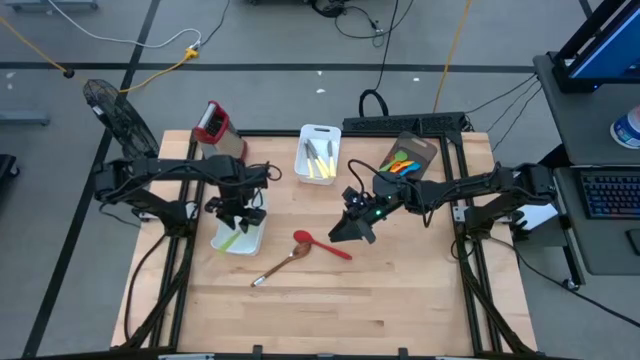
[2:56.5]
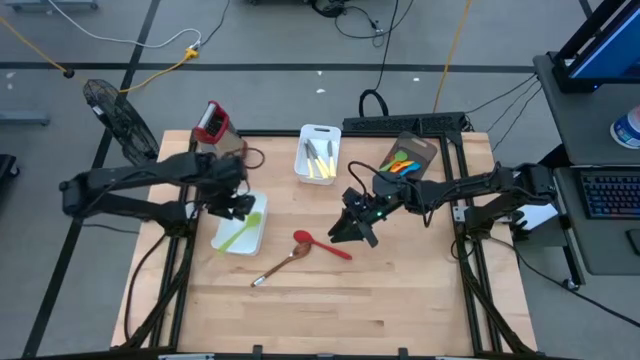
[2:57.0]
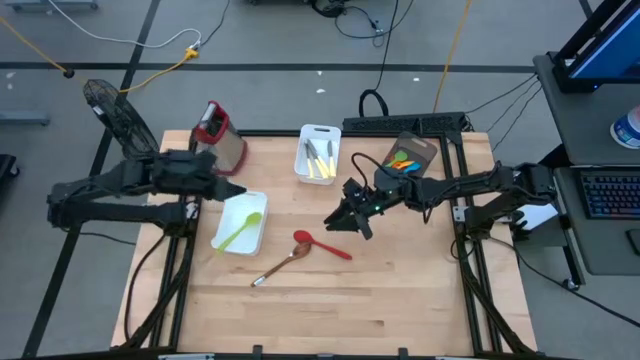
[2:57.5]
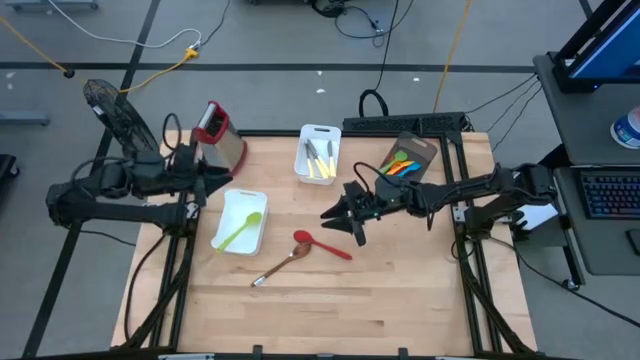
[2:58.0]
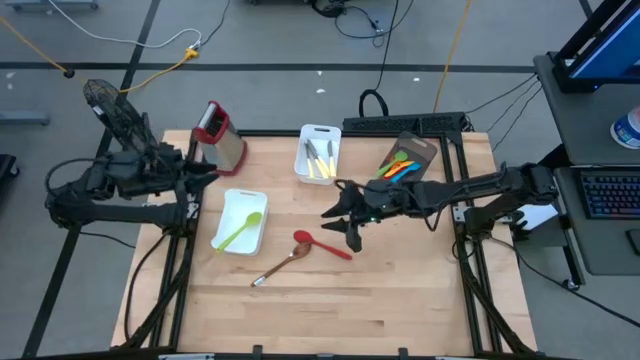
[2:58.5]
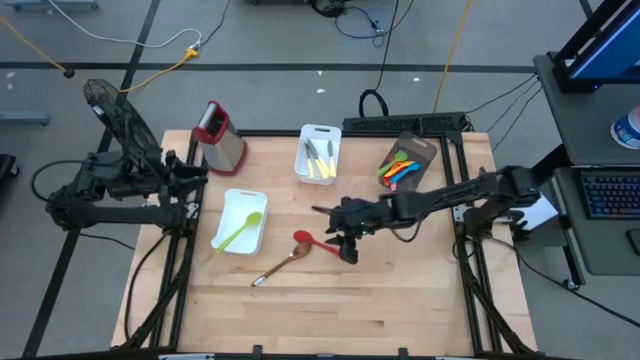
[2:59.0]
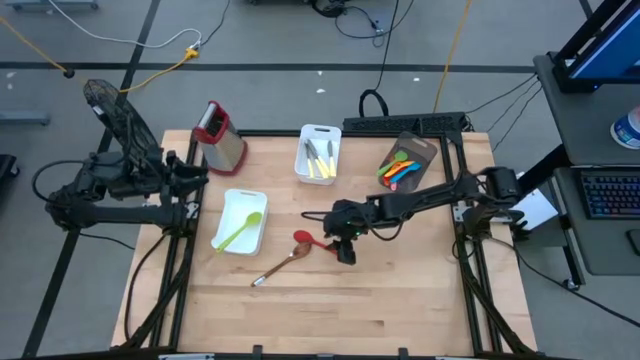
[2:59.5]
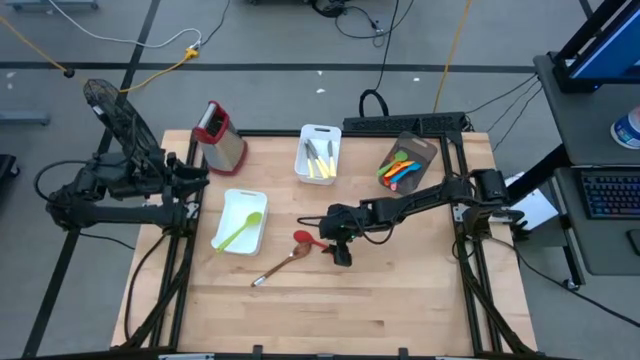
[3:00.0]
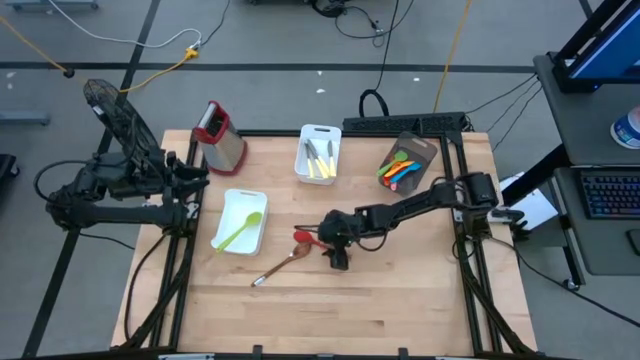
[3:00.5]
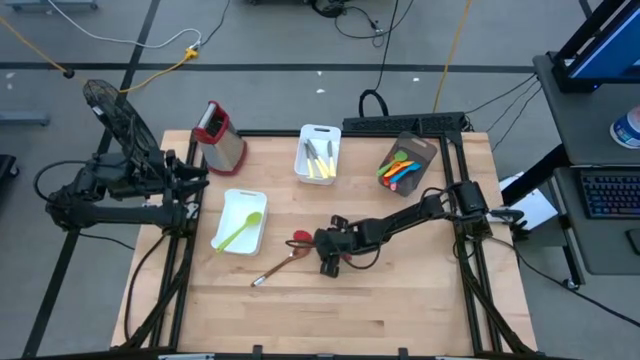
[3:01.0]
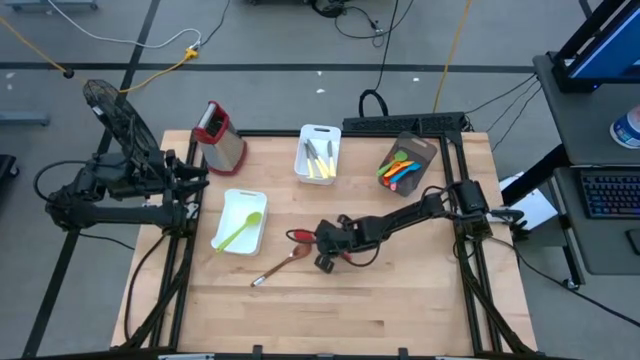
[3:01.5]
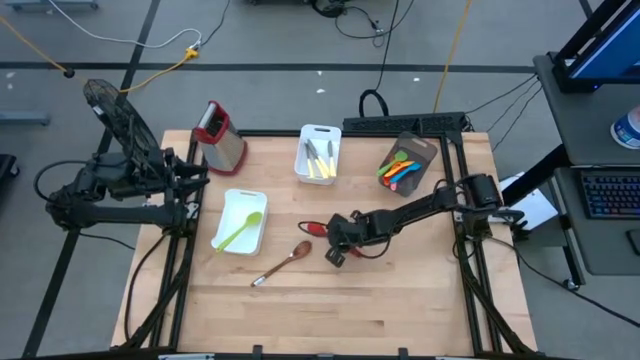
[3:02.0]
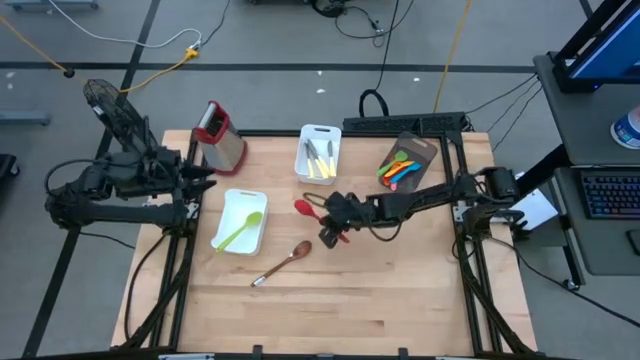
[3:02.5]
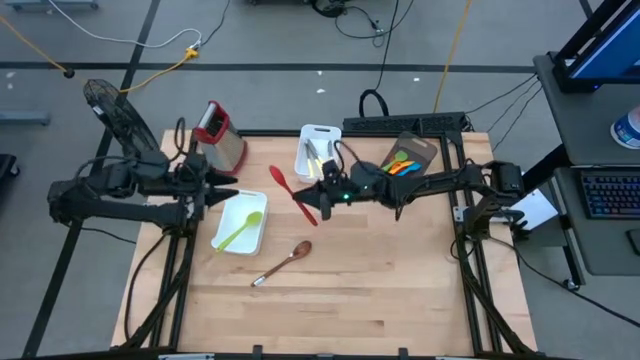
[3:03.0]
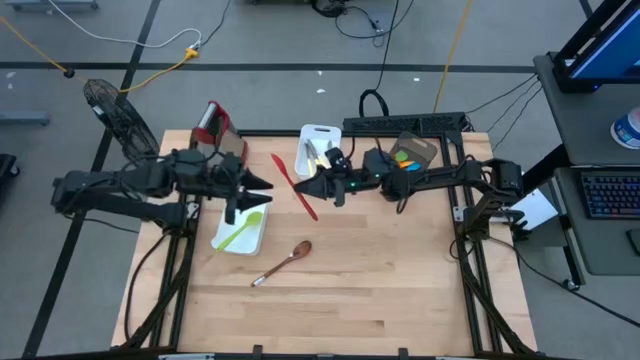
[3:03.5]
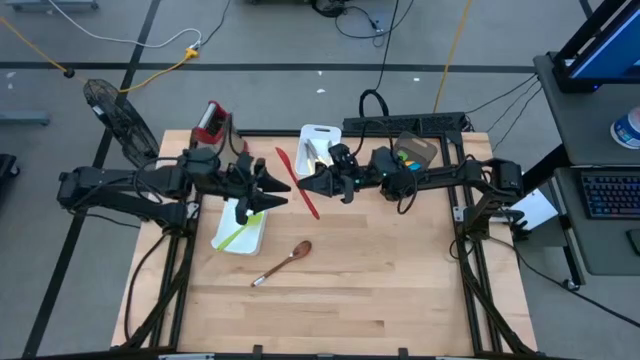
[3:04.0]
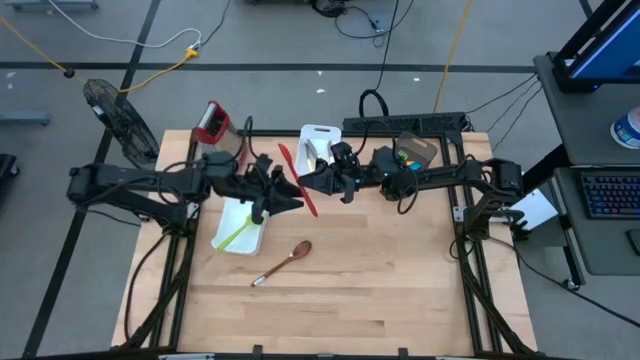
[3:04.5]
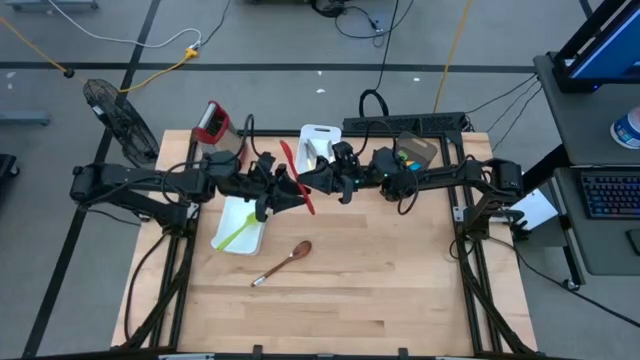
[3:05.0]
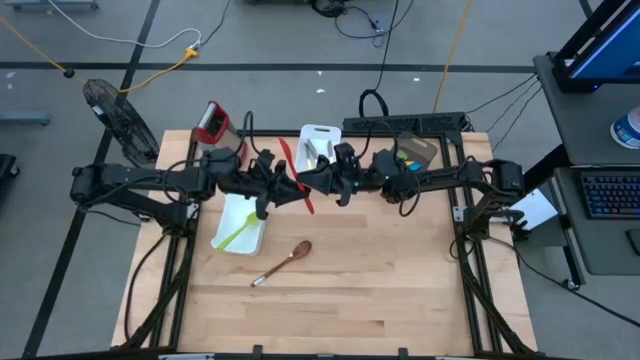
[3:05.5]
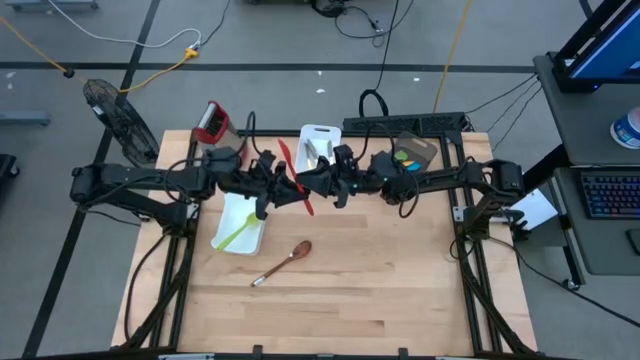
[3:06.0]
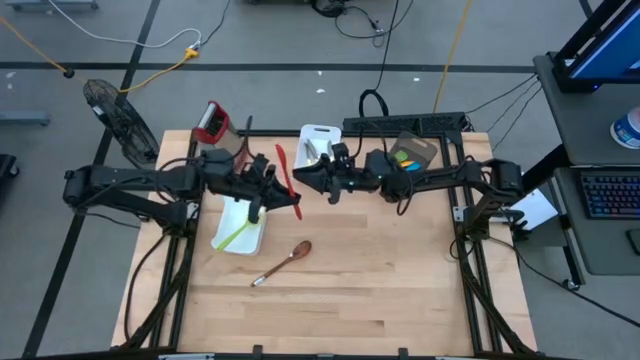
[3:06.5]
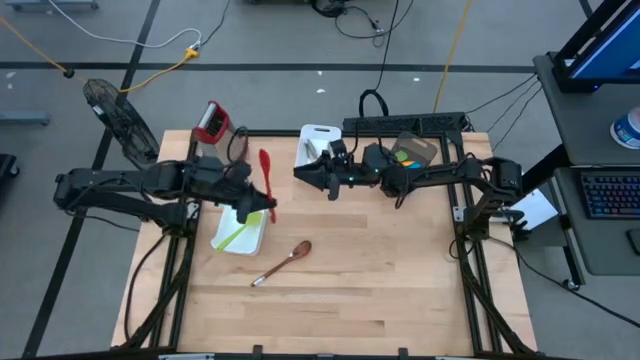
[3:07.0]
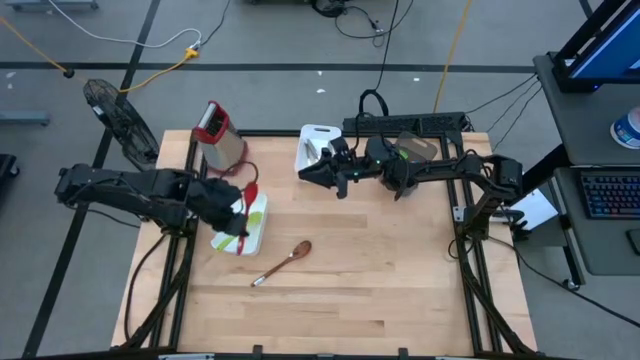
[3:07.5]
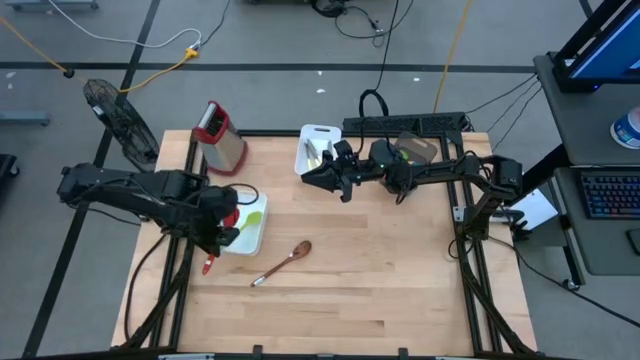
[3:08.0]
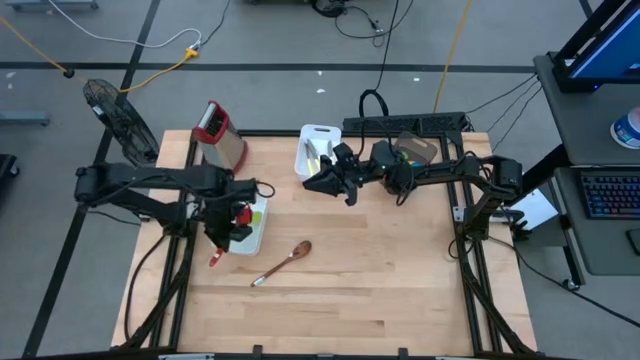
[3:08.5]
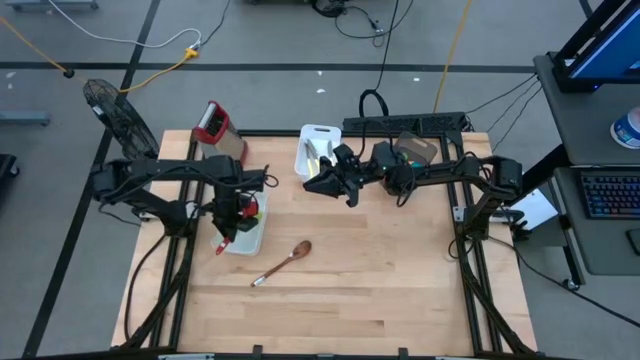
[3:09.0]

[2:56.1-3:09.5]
Task: Pick & Place Kitchen Items
Put the red serving spoon into the bottom white bin

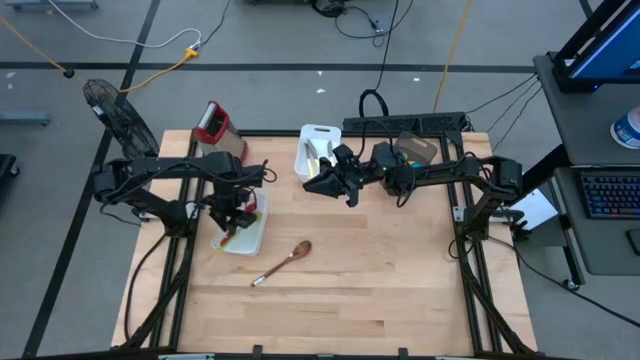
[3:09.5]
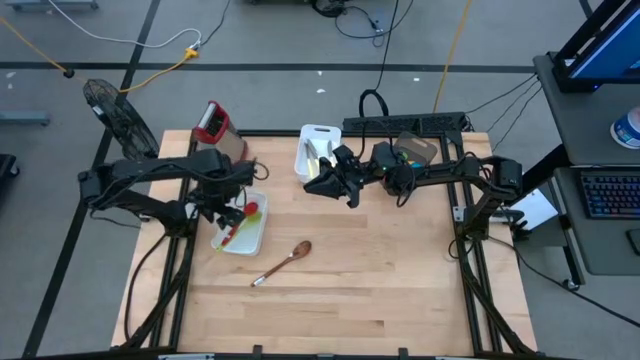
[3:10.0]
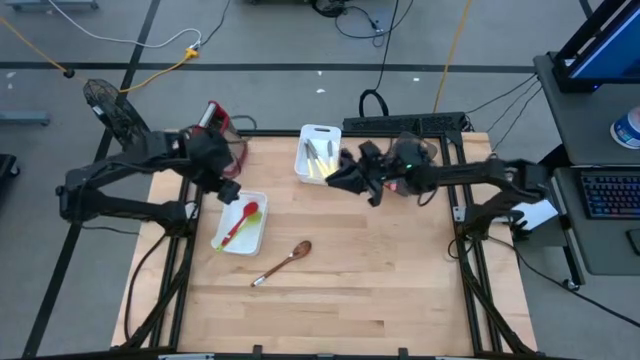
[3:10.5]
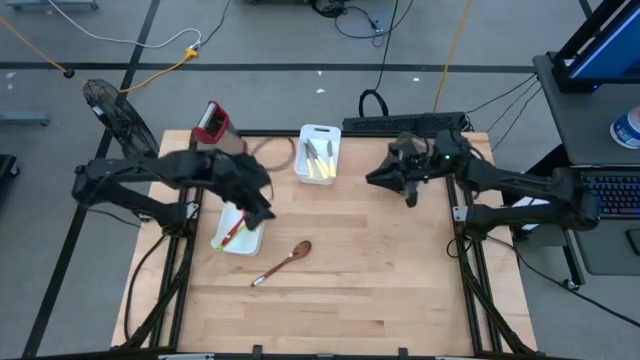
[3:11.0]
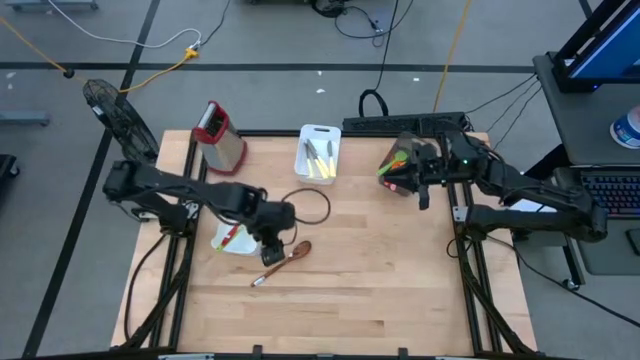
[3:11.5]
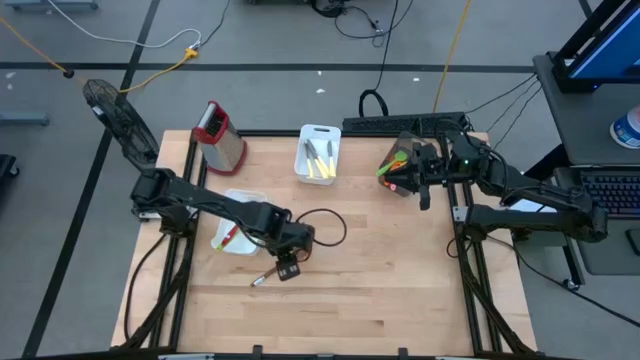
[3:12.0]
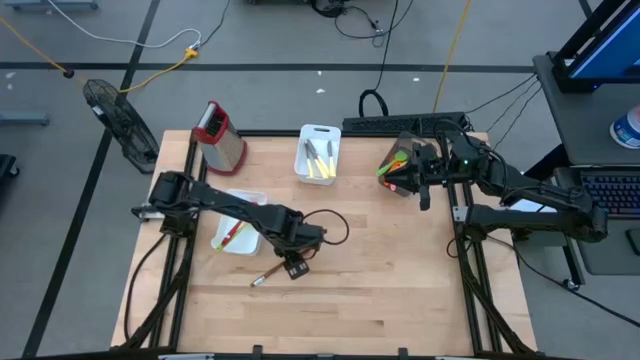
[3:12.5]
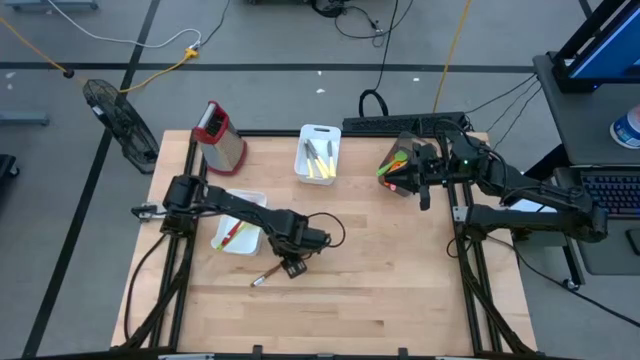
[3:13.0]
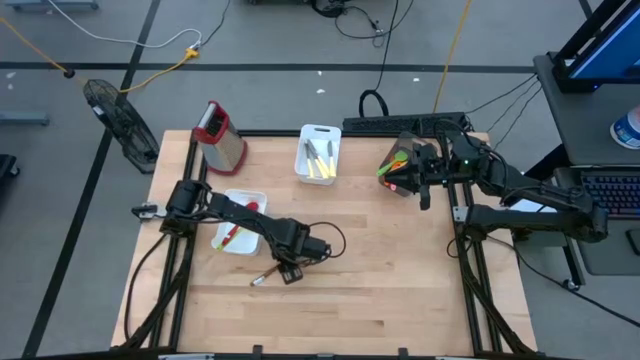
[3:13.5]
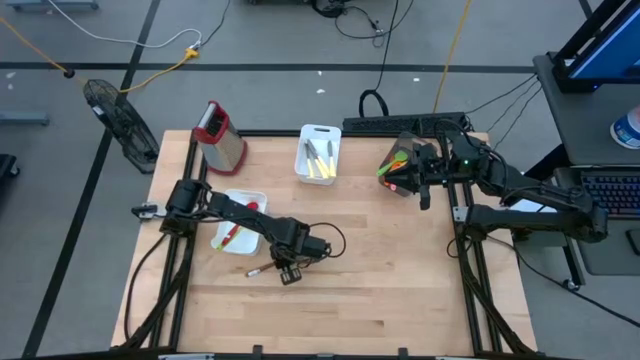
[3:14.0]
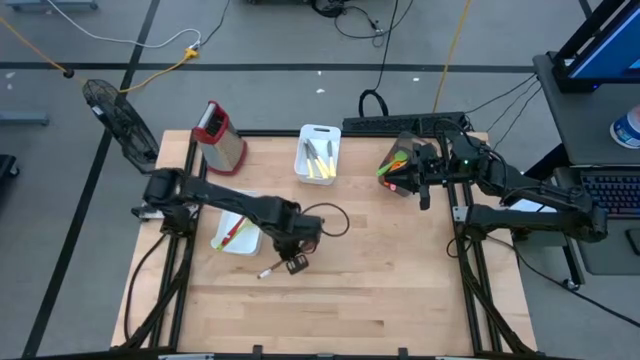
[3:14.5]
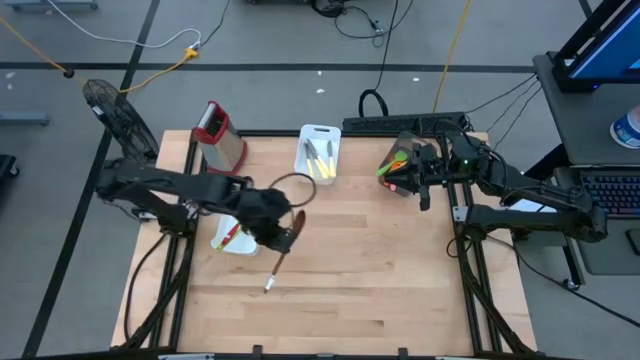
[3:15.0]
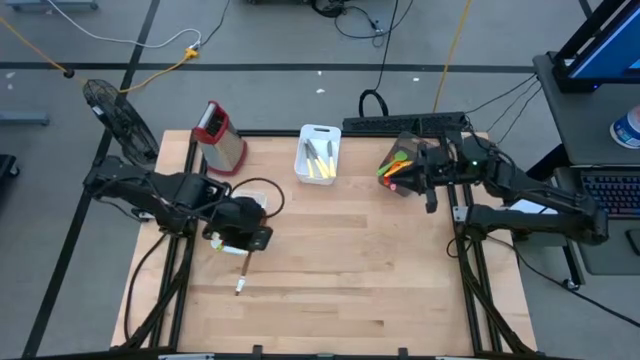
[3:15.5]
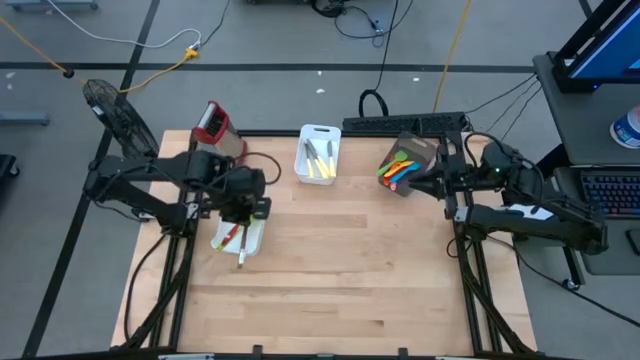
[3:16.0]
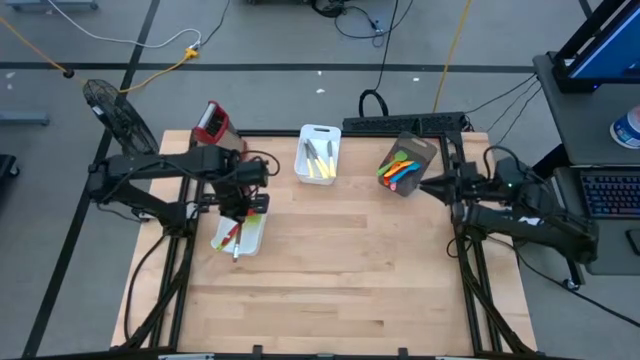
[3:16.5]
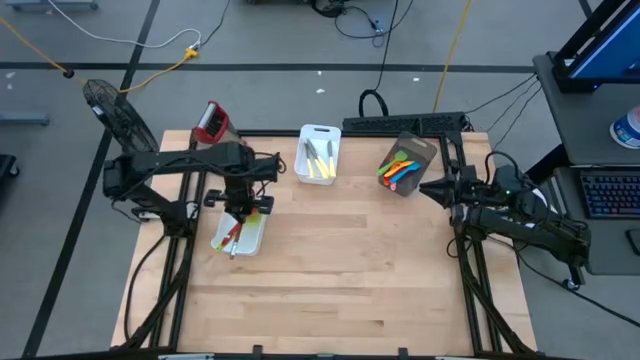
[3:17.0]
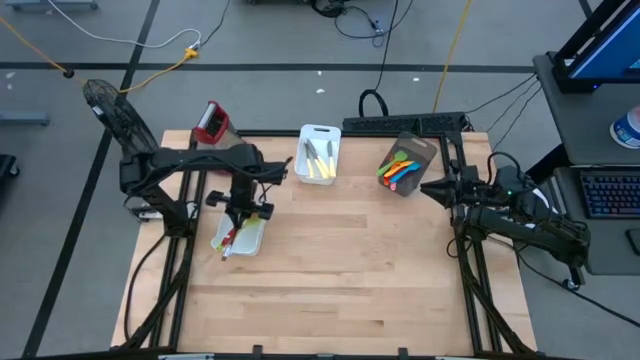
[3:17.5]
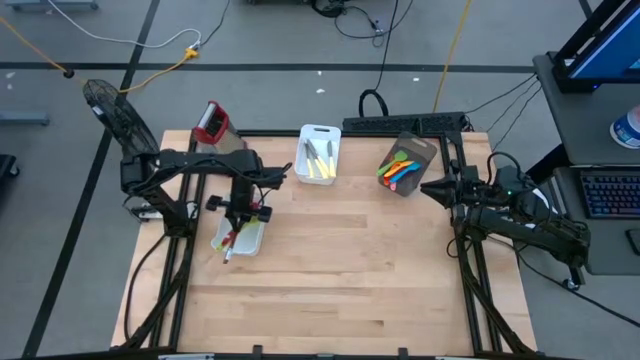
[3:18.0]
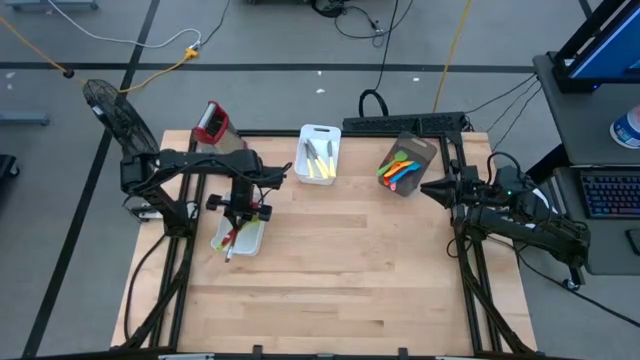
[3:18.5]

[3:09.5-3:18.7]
Put the wooden serving spoon into the bottom white bin
